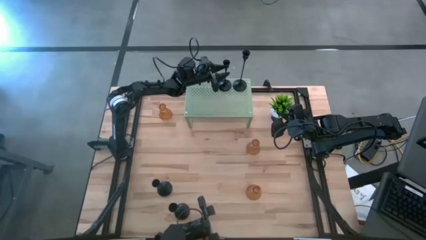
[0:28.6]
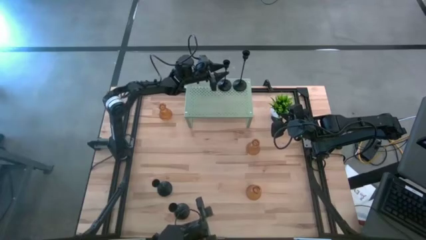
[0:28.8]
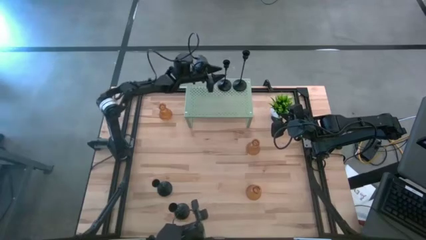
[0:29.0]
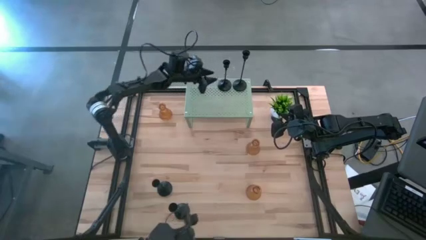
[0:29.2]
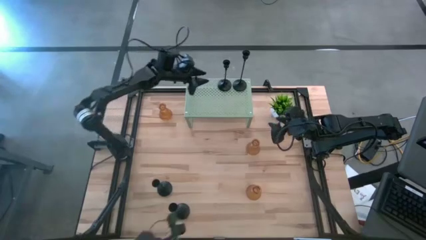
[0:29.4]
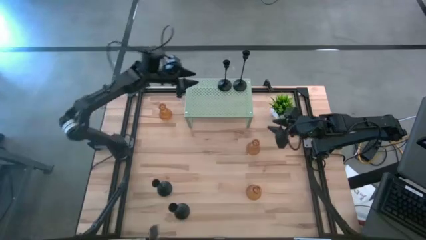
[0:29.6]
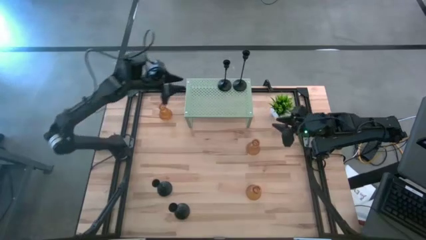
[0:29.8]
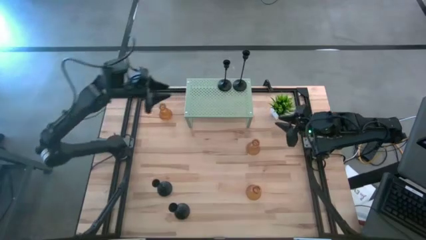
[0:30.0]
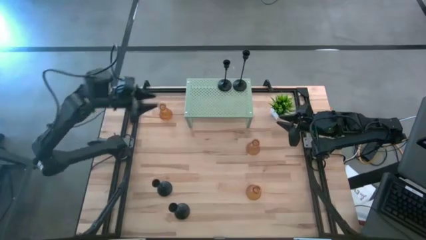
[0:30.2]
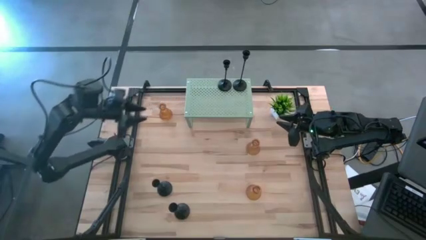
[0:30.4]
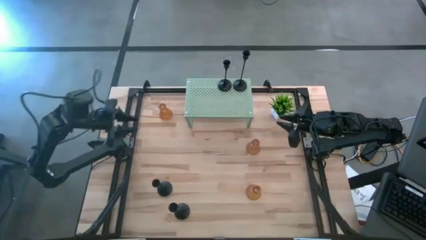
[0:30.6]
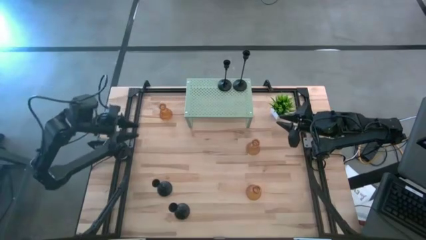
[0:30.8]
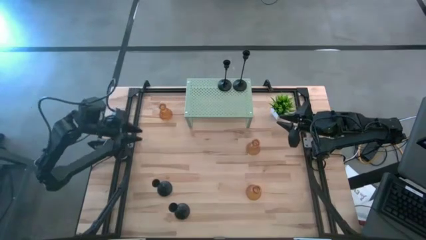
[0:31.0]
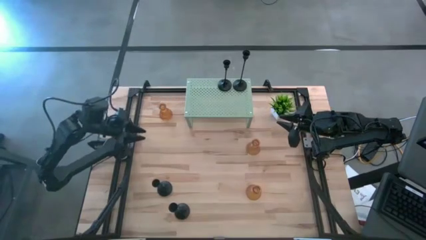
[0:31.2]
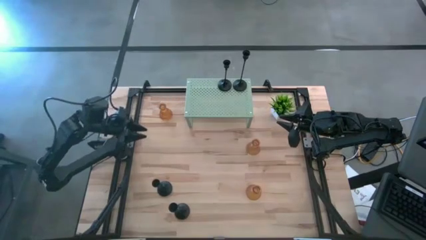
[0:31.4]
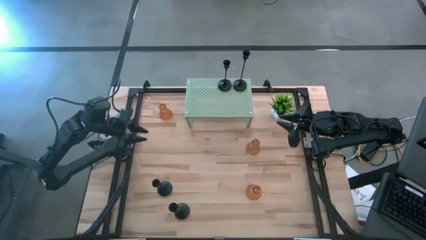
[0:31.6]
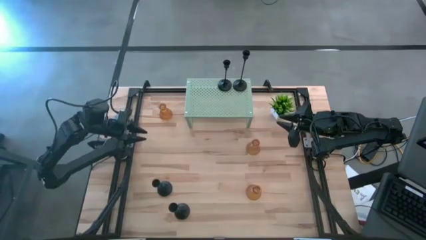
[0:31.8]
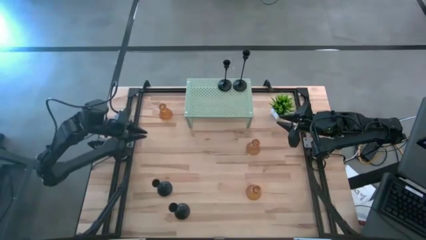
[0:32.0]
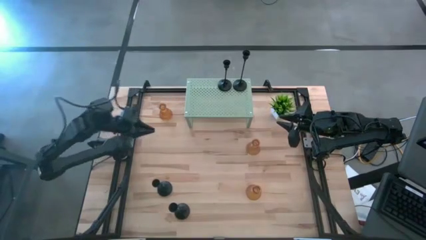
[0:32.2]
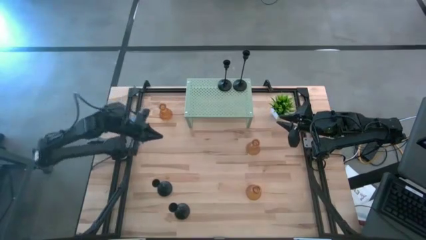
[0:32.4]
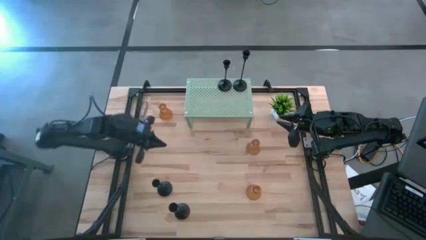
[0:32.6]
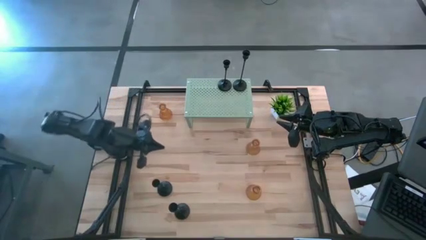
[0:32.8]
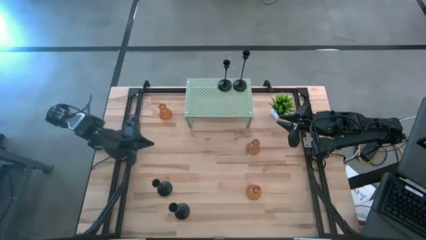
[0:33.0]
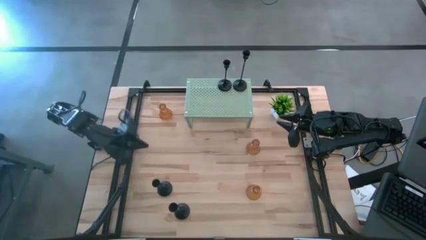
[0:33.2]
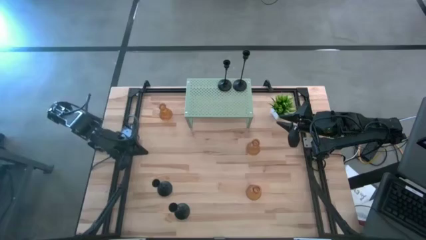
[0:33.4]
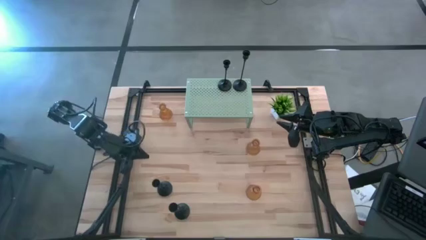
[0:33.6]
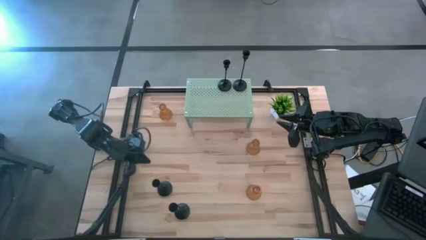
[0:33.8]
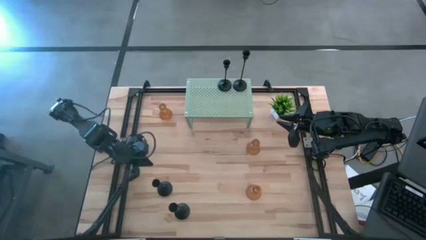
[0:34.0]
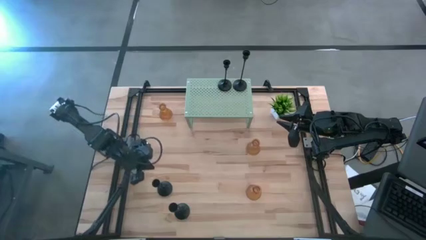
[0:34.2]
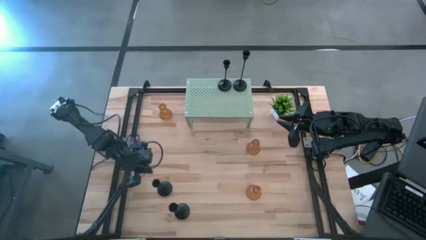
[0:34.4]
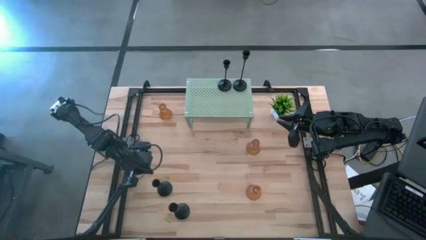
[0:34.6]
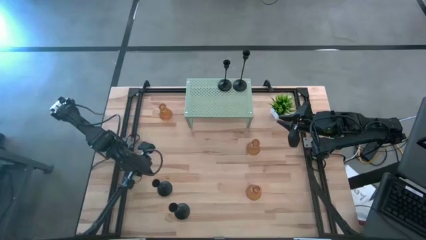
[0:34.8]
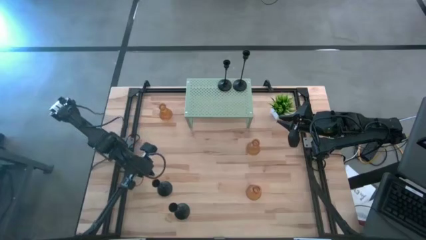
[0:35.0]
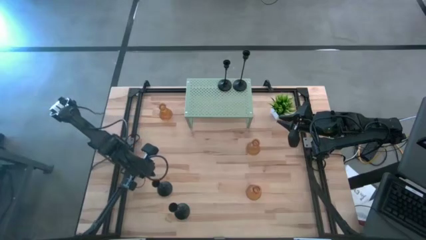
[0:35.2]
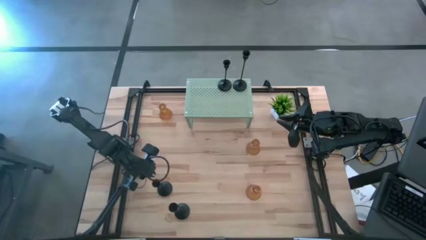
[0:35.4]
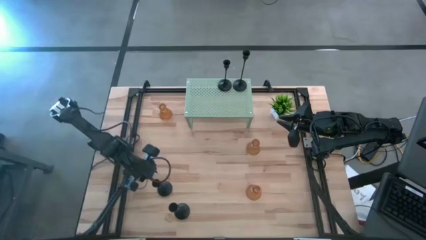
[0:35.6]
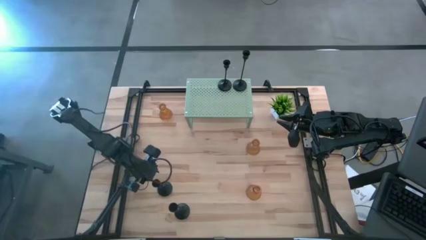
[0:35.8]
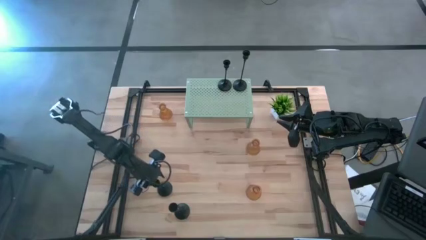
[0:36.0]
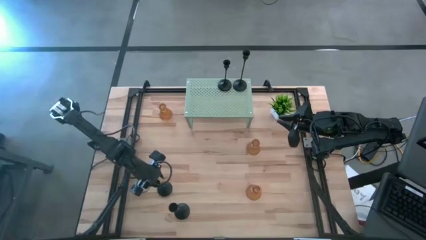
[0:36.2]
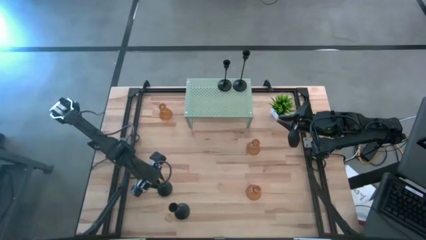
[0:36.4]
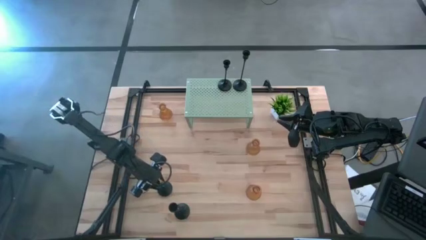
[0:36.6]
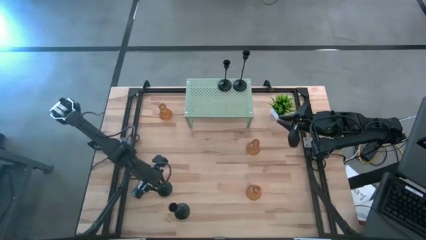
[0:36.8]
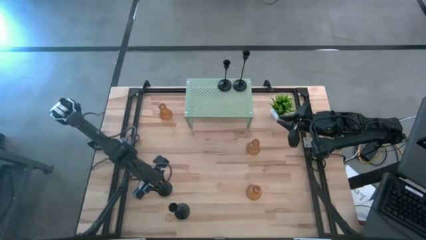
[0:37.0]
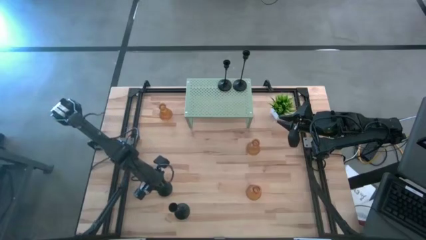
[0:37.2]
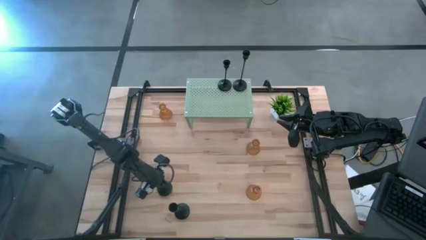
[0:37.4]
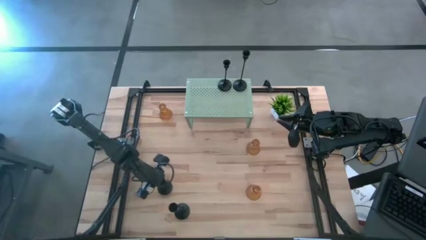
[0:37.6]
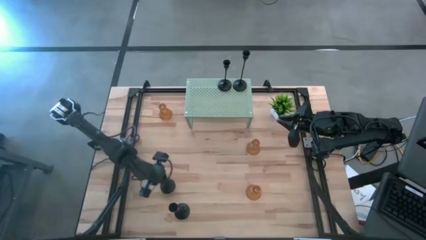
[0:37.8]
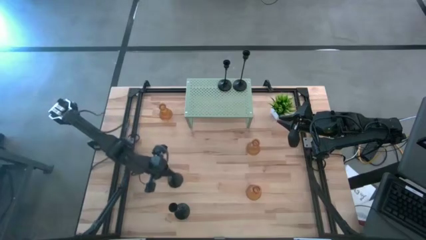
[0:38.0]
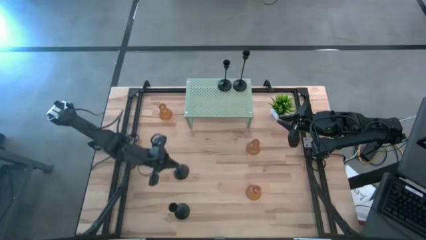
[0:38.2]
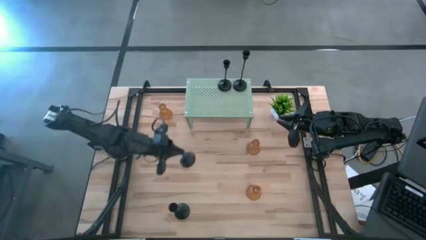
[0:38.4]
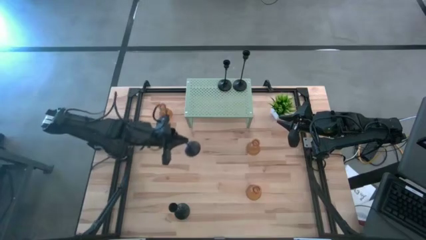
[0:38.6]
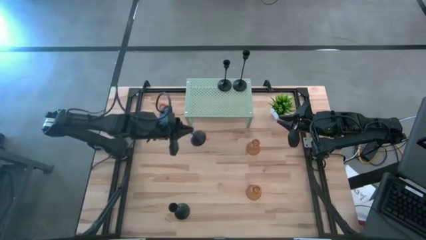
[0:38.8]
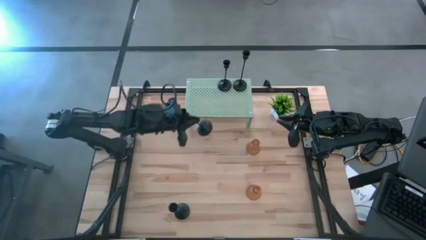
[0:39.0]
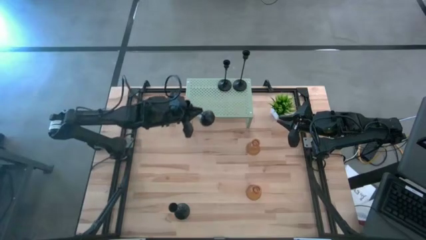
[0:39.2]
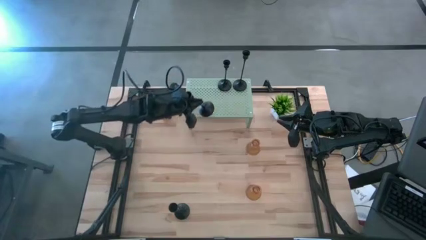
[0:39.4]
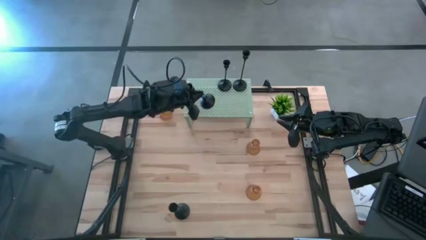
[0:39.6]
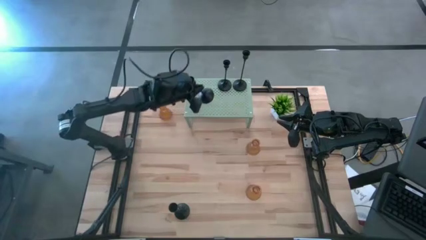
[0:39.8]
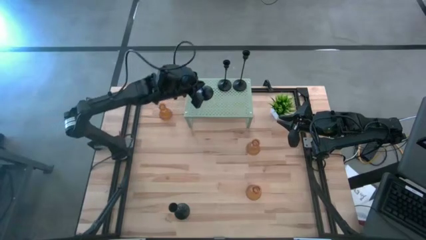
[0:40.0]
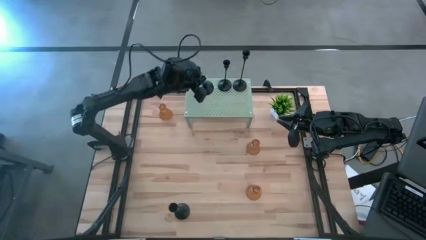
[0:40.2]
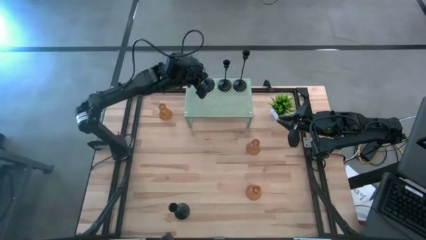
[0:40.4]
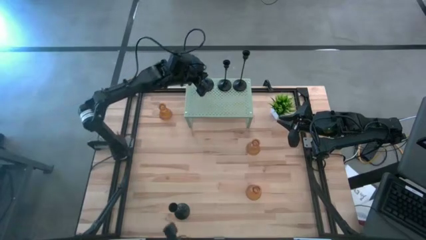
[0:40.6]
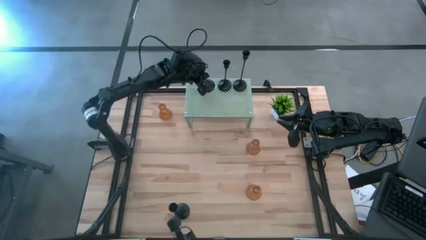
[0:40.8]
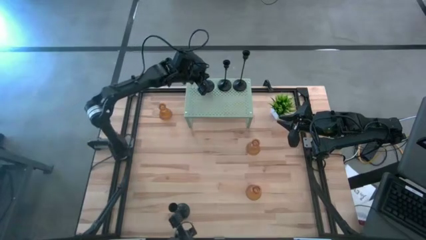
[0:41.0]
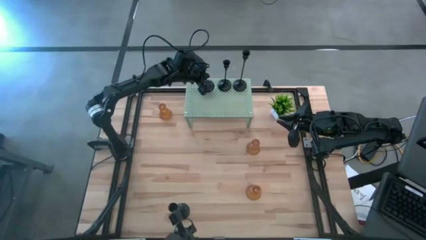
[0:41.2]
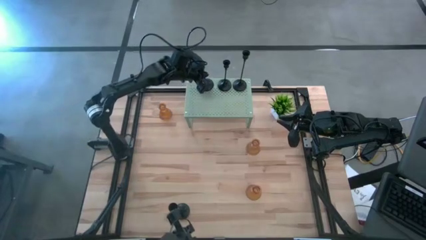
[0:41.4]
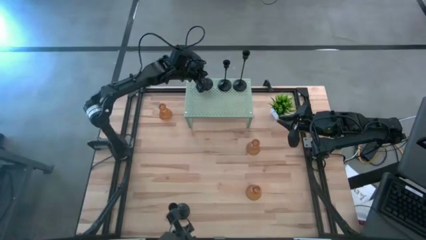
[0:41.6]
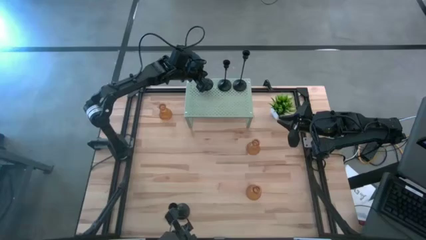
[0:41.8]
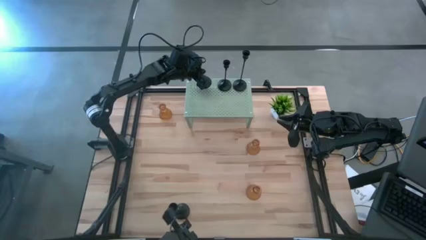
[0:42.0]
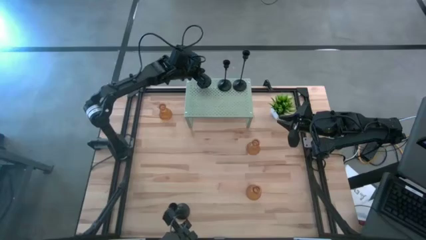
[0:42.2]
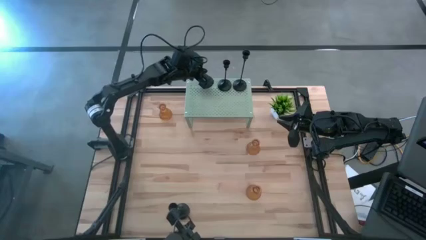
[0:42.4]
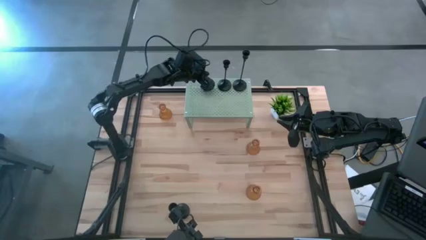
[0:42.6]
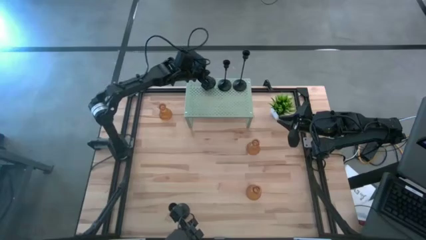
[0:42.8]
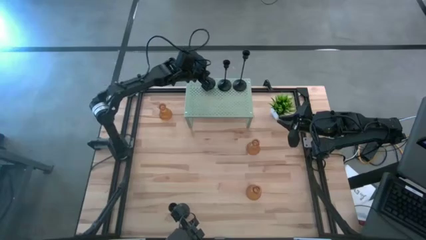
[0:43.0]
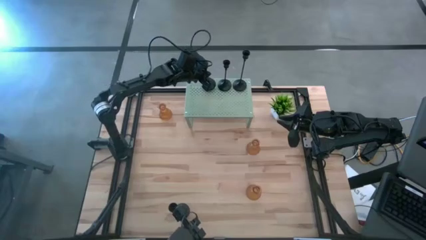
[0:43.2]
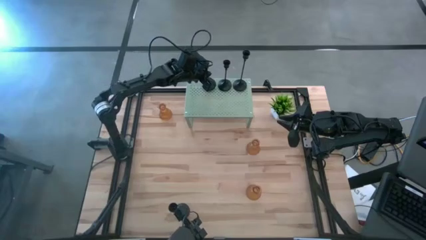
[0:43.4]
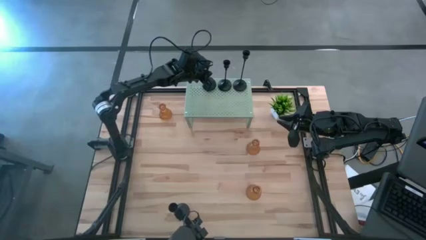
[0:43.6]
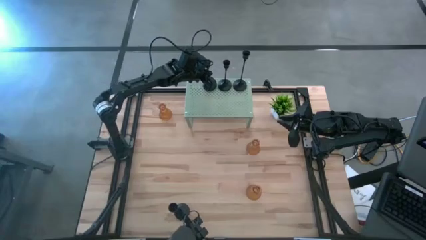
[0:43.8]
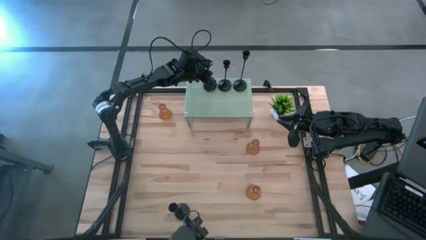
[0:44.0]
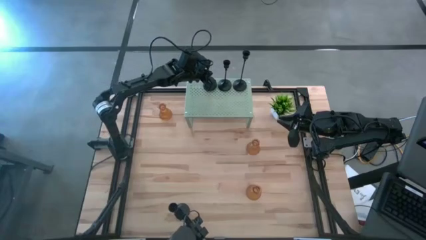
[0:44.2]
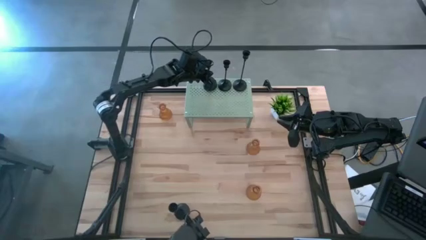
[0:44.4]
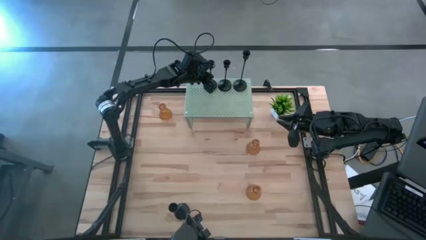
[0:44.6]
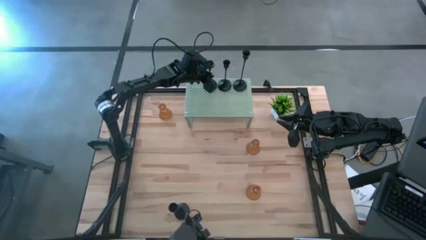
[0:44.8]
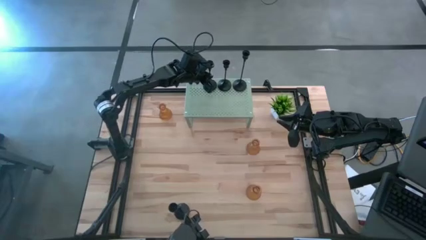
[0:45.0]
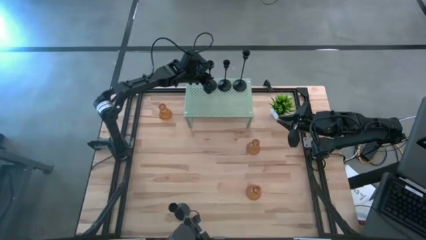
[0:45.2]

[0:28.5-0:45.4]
Task: Pick & Place candle stick holders
Put the top black candle holder on the shelf aligned with the other black candle holders
